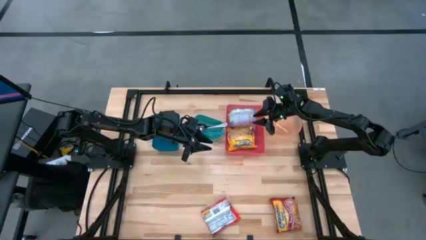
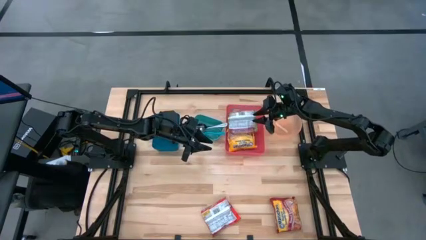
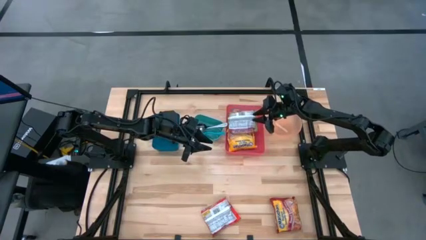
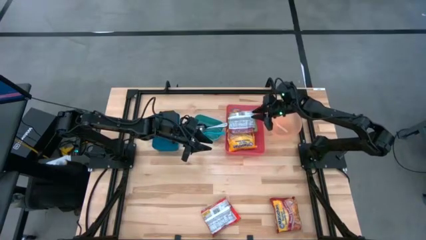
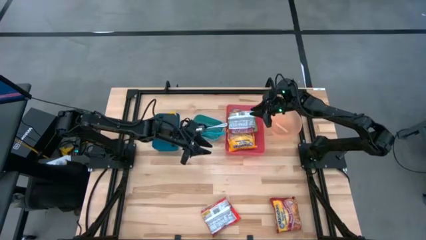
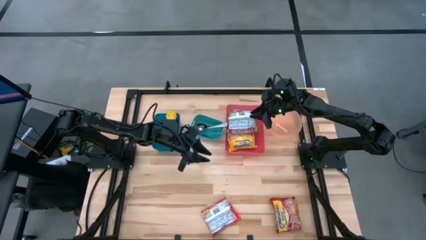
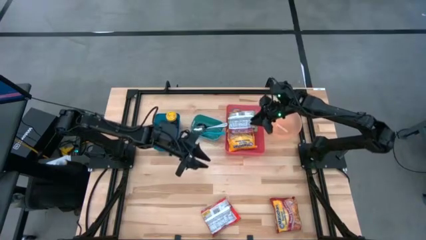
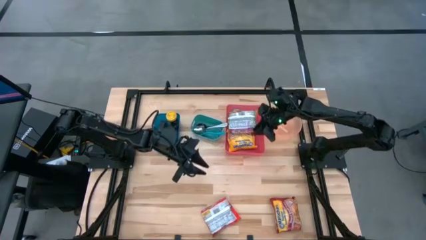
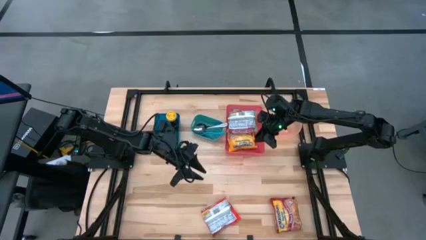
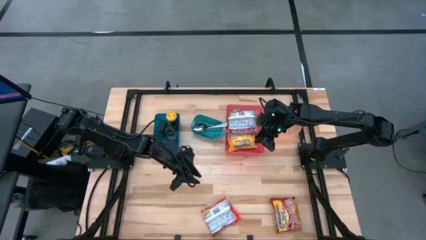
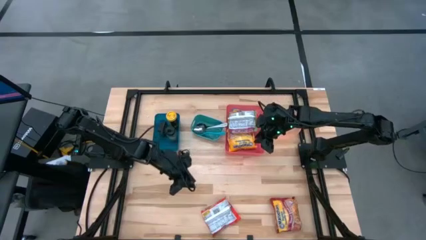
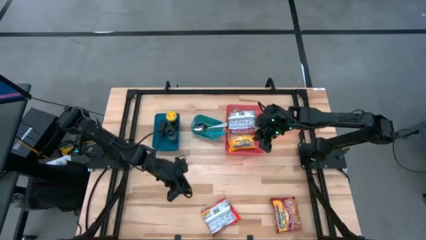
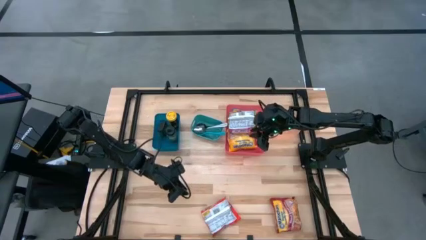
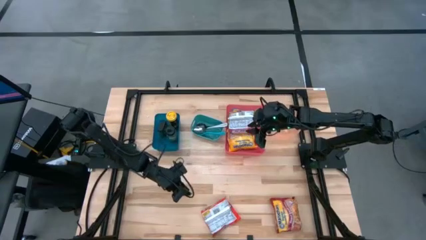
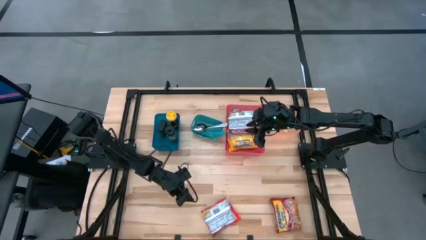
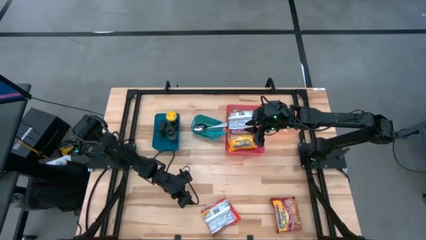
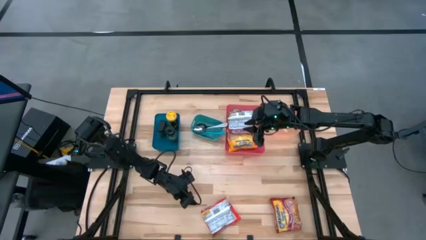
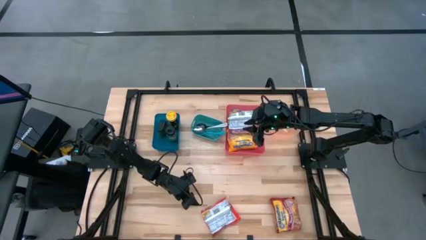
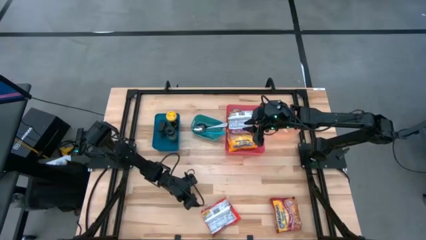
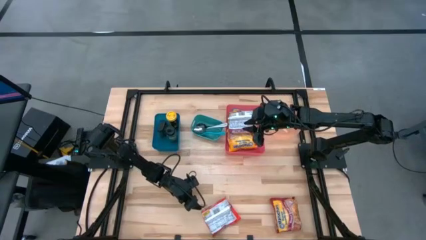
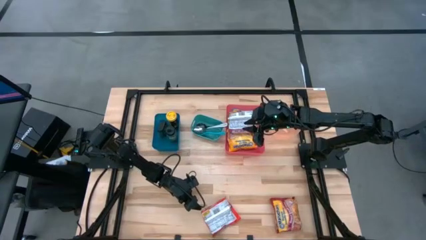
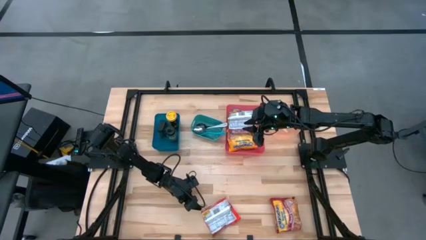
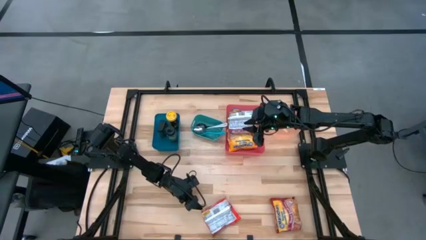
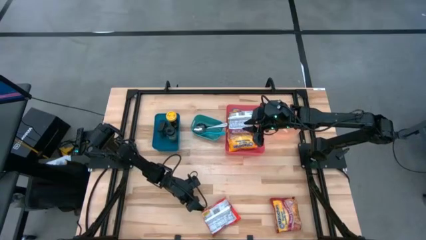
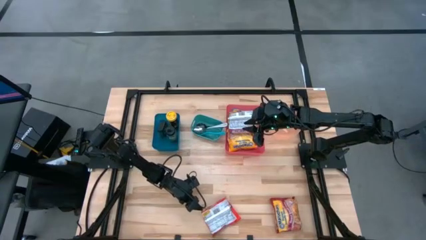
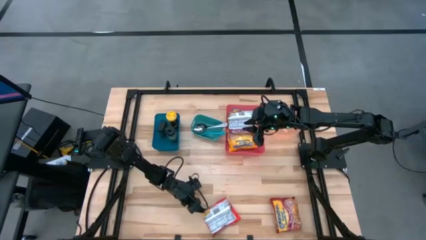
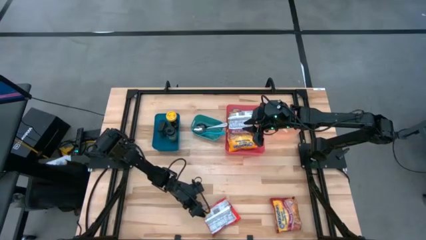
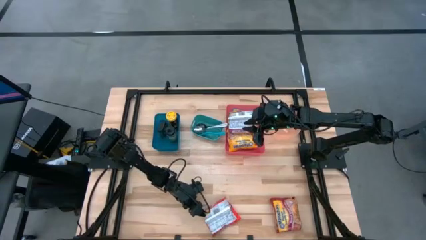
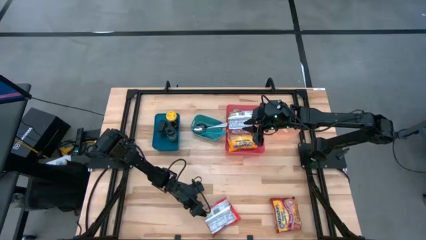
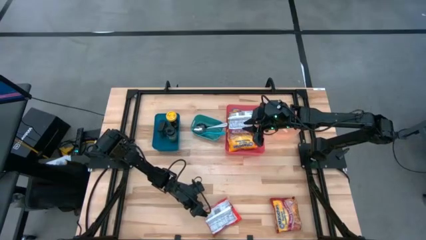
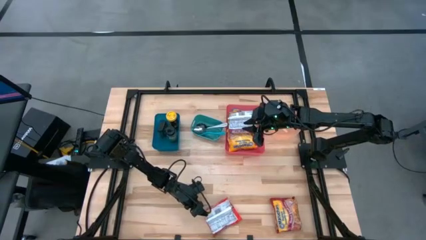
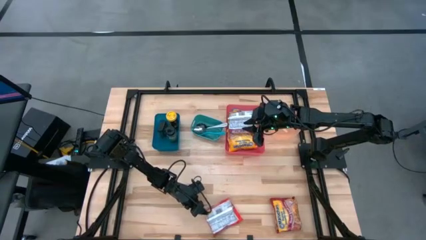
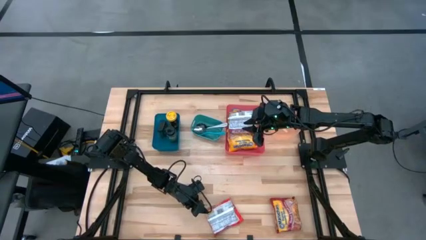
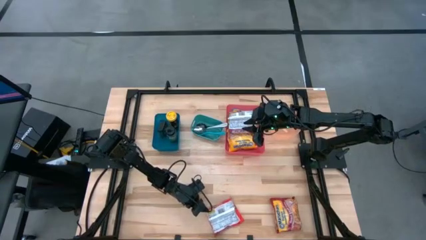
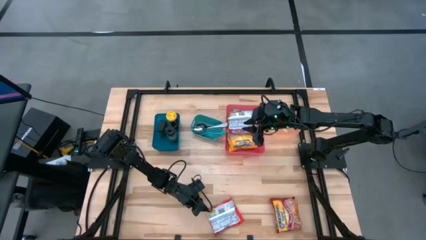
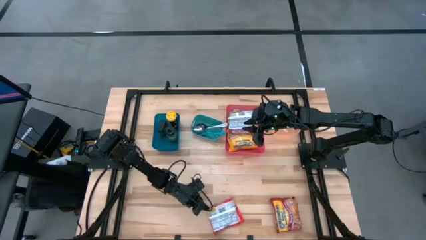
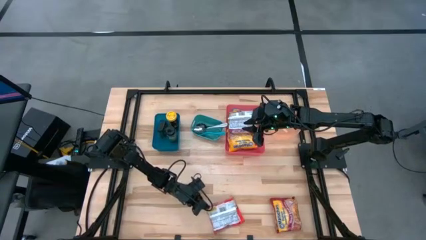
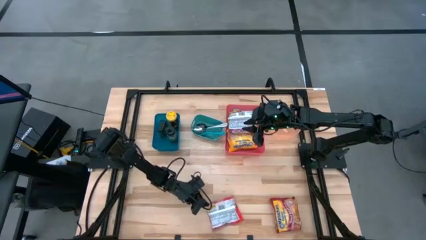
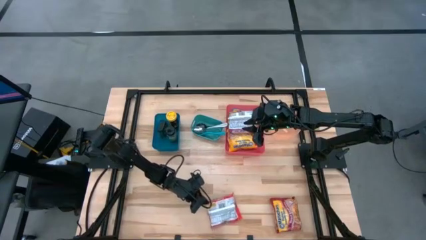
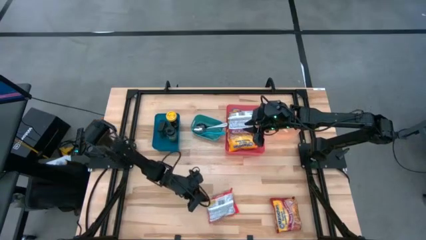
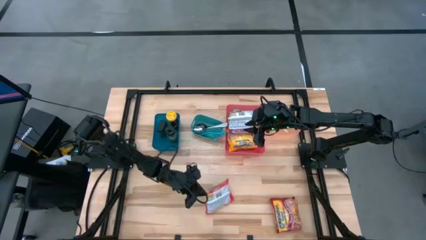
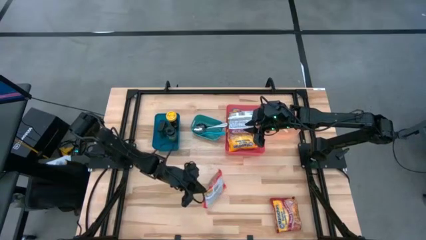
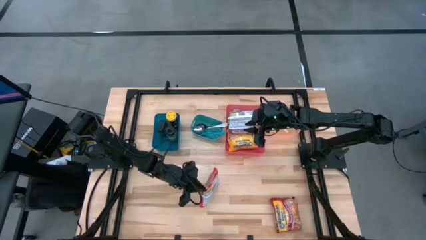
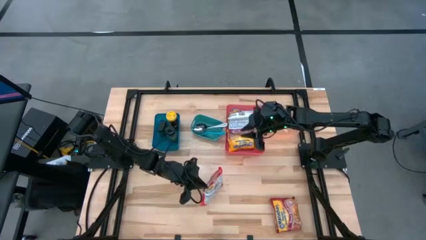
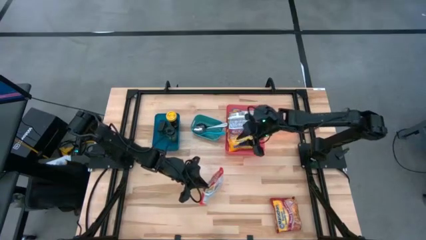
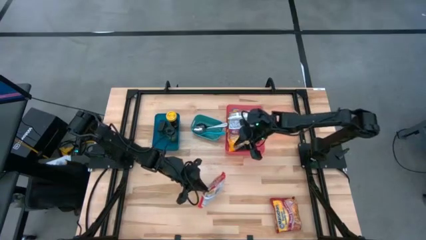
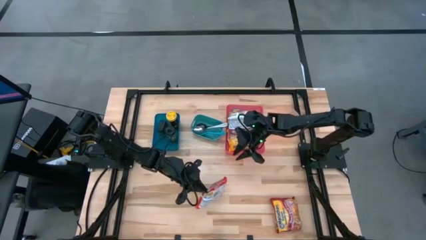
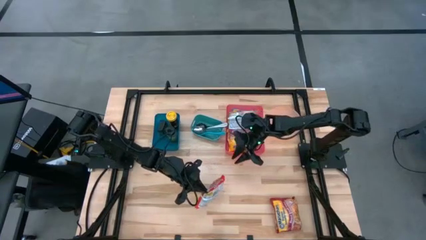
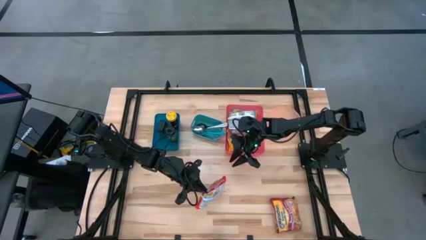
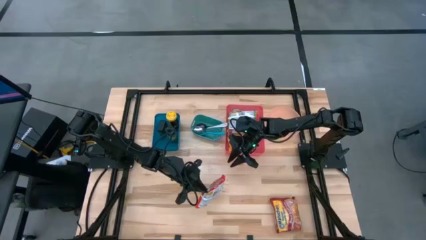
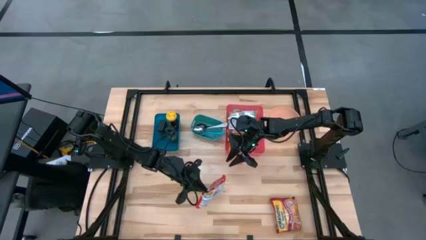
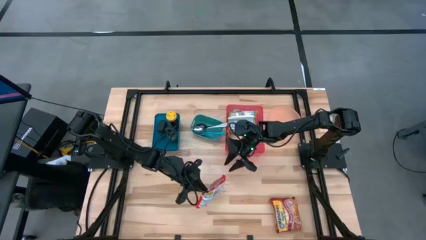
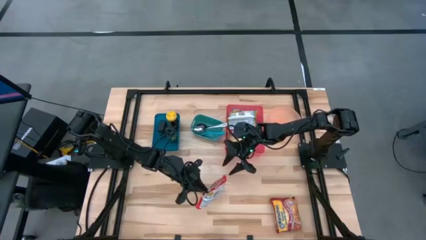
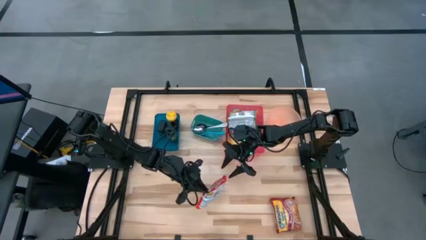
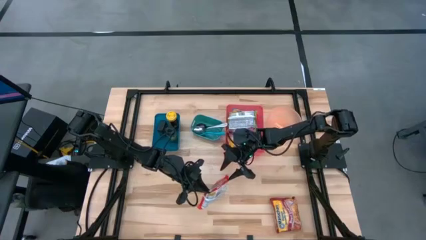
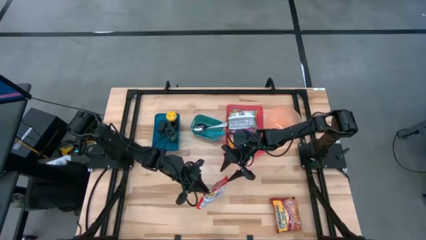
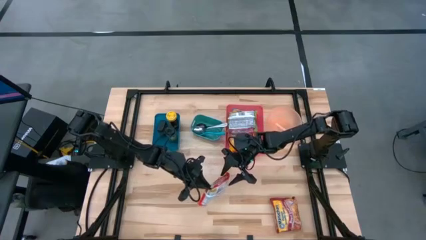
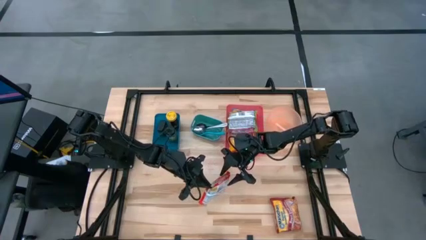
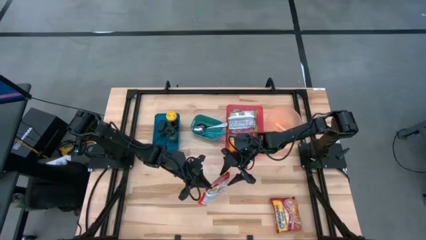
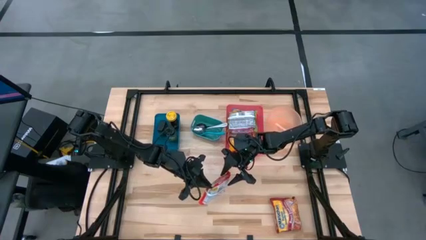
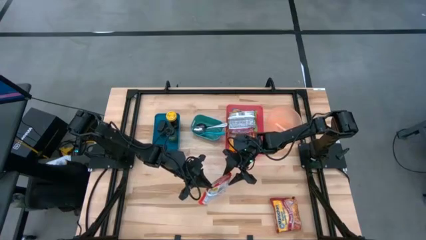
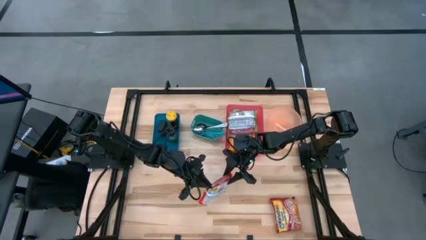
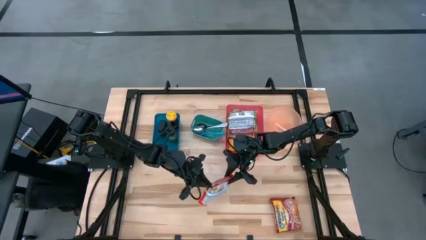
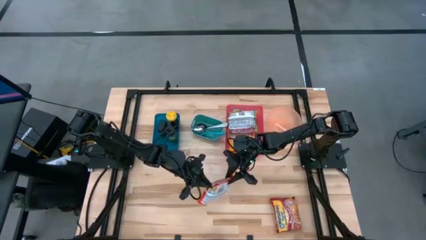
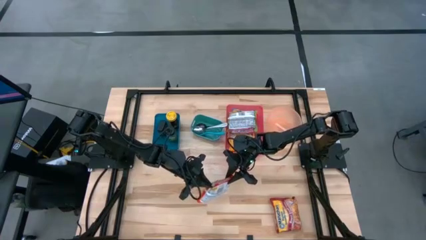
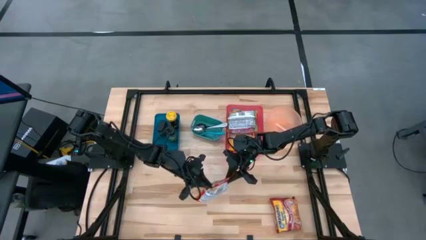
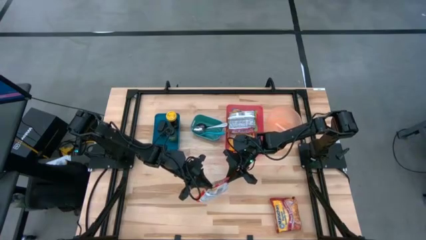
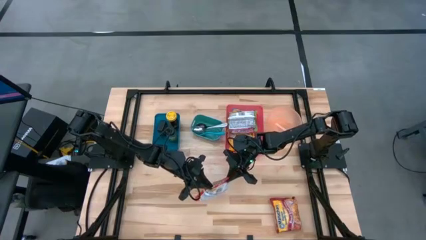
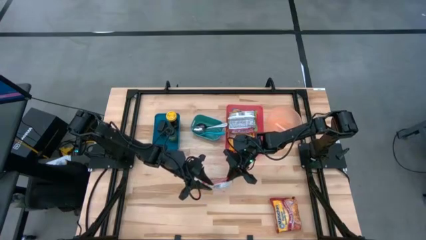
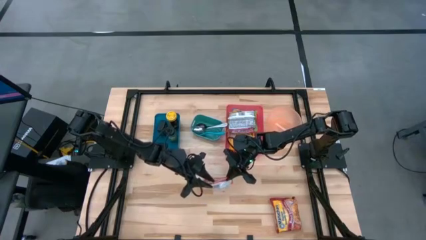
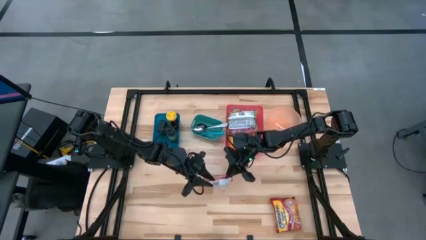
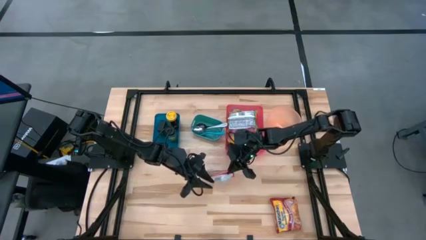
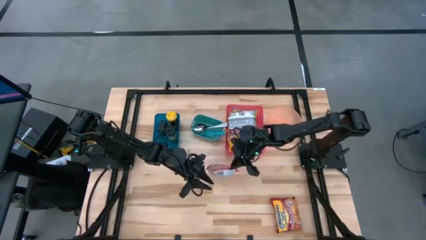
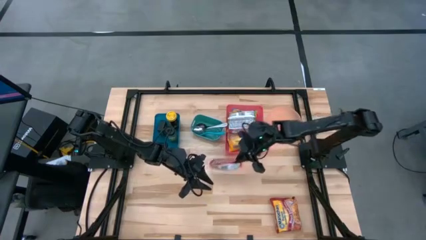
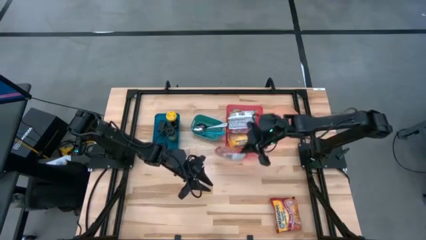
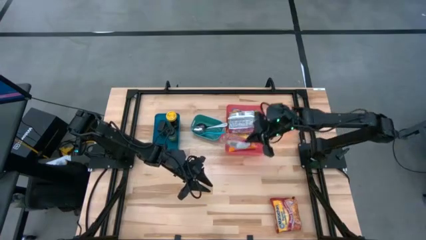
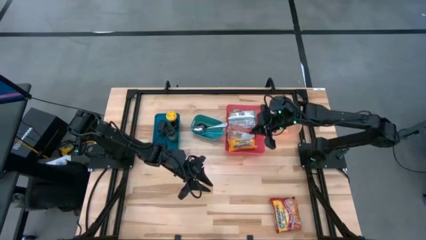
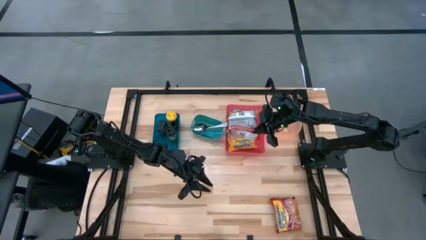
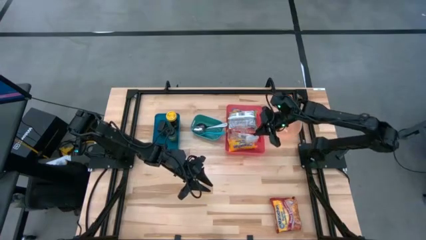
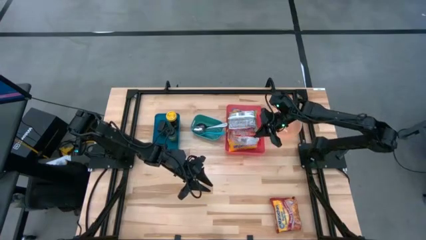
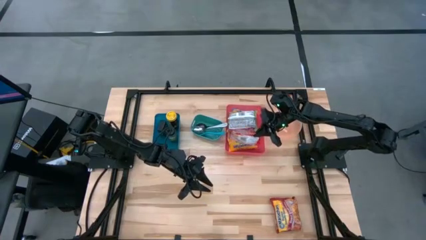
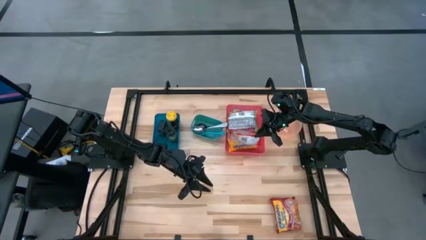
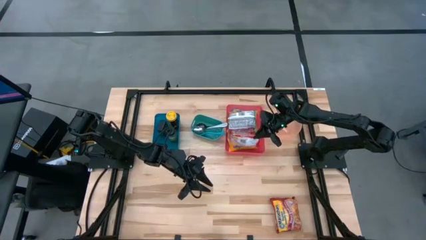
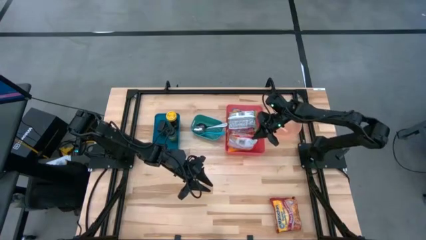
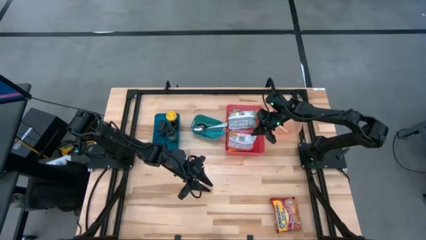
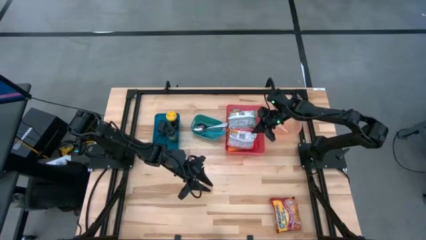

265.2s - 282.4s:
Task: Pick & Place Food Item
Put the orange noodle pack into the red bin
